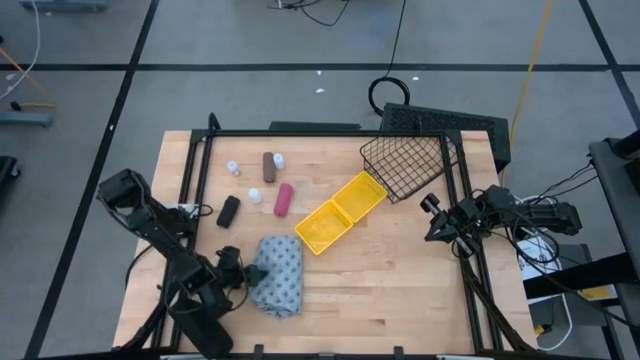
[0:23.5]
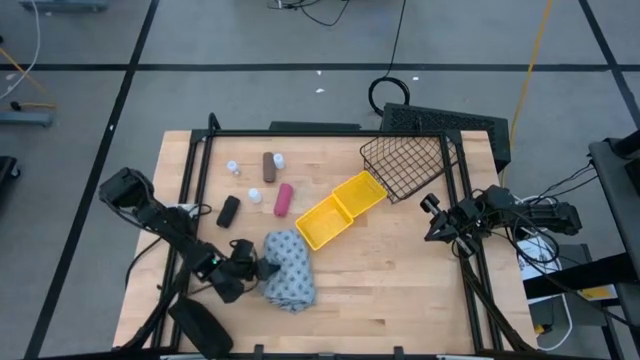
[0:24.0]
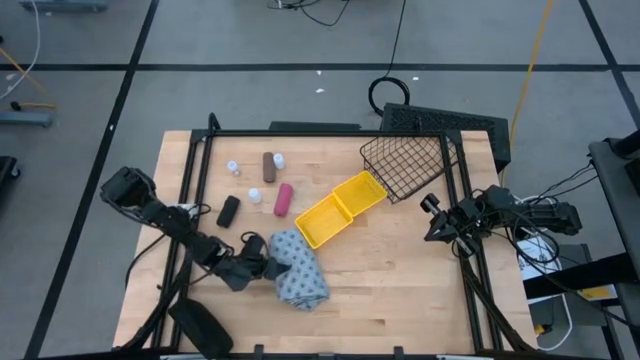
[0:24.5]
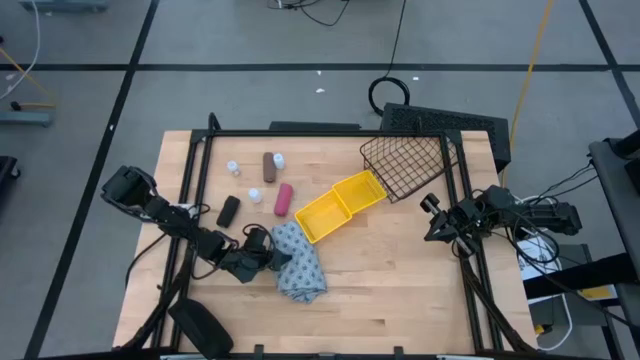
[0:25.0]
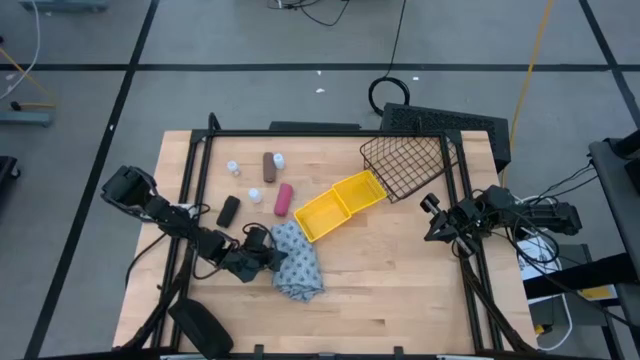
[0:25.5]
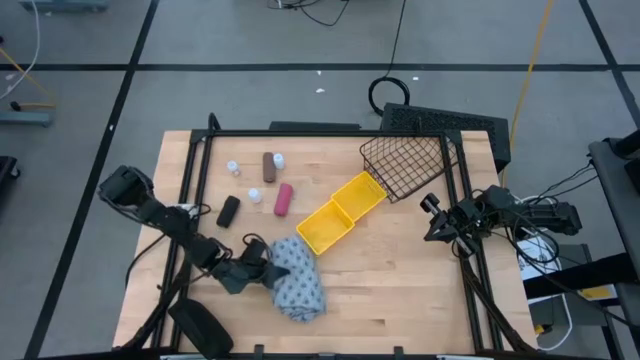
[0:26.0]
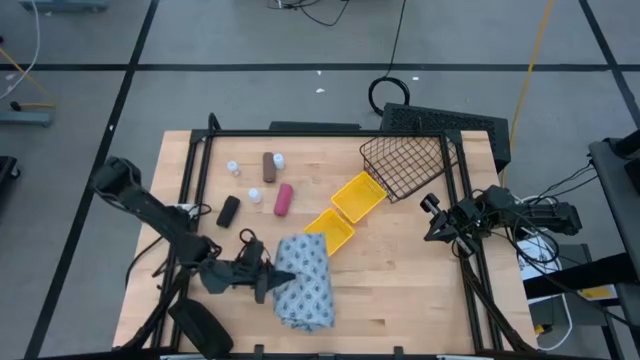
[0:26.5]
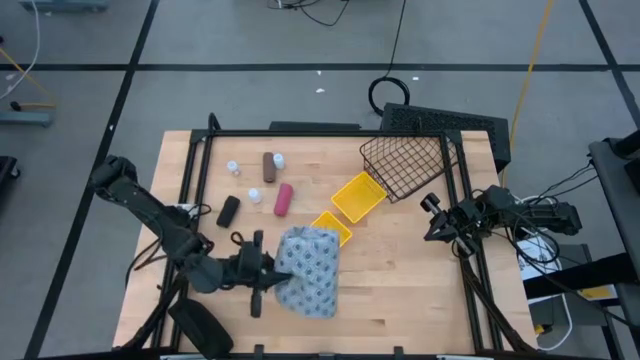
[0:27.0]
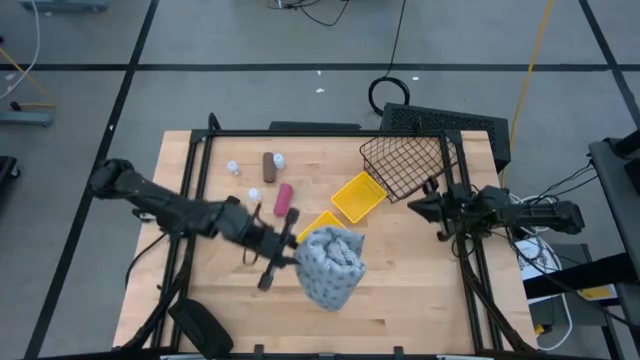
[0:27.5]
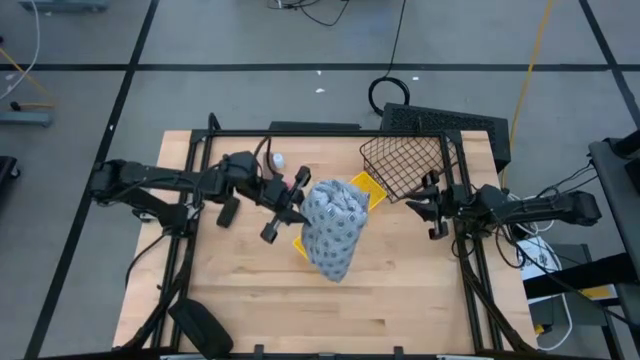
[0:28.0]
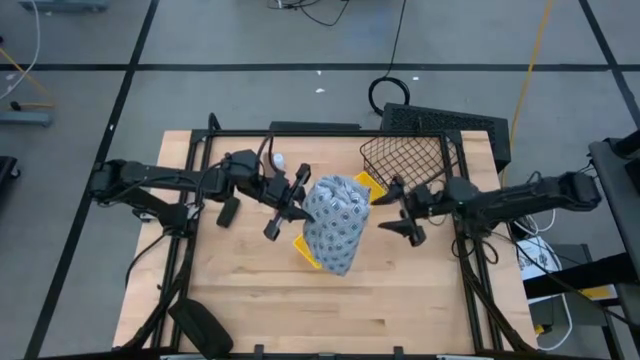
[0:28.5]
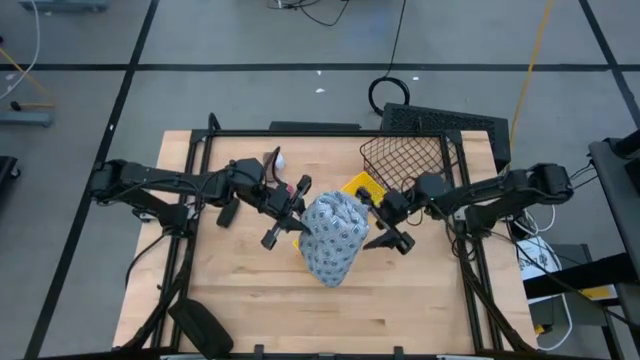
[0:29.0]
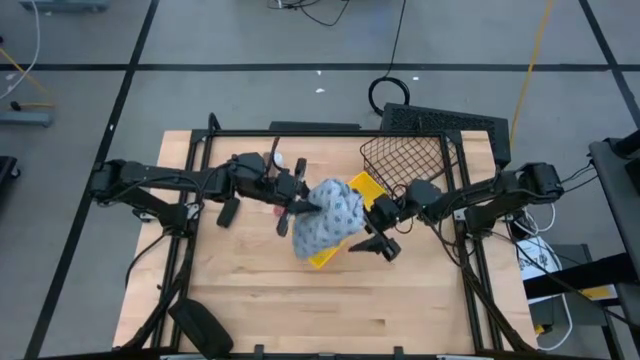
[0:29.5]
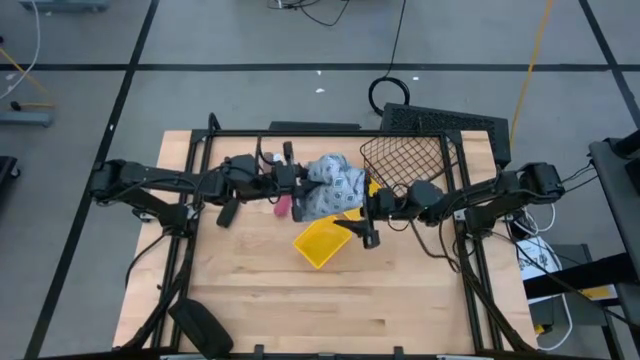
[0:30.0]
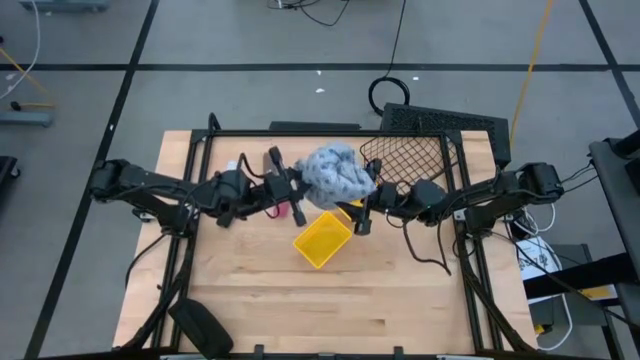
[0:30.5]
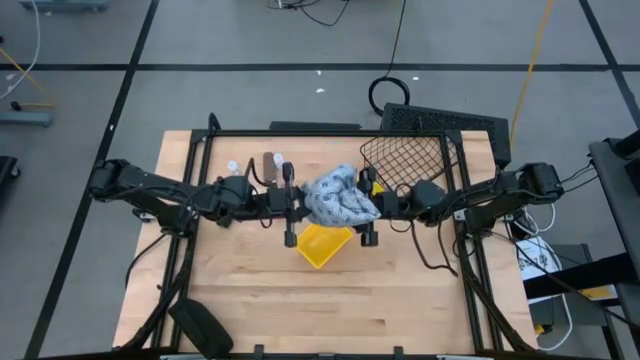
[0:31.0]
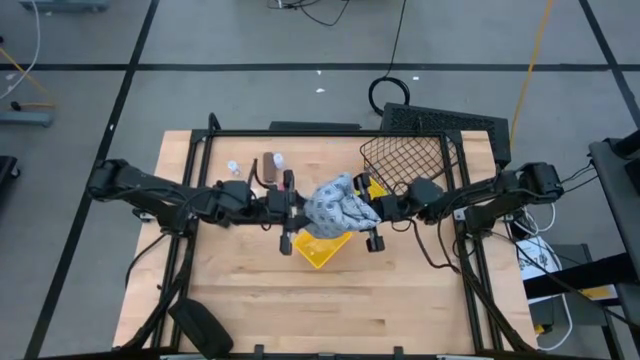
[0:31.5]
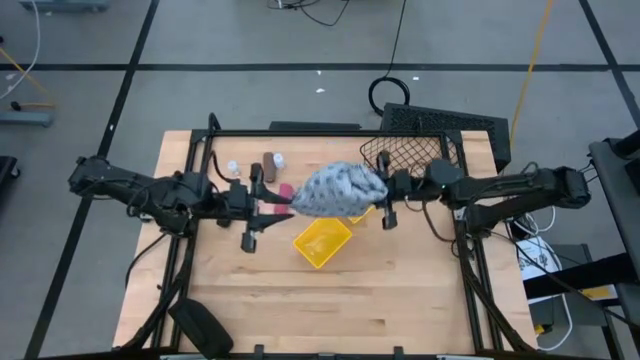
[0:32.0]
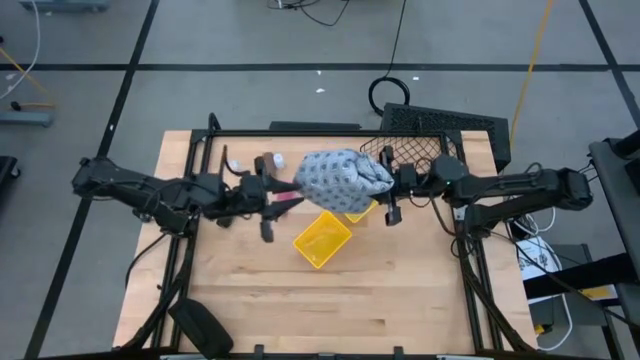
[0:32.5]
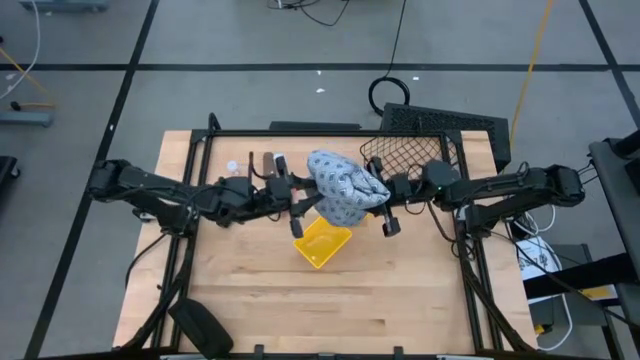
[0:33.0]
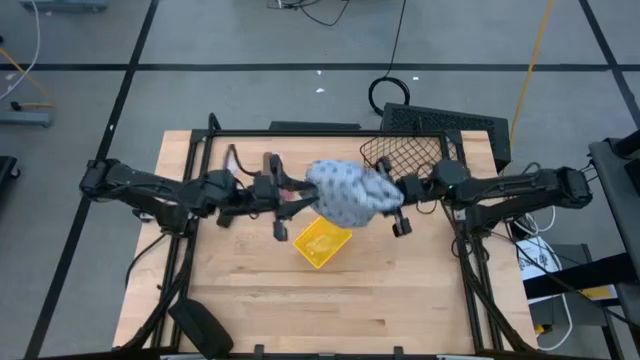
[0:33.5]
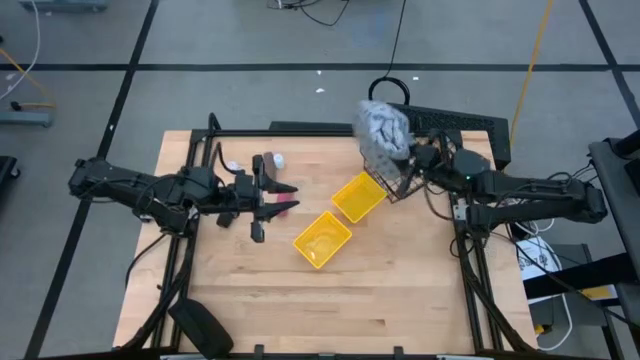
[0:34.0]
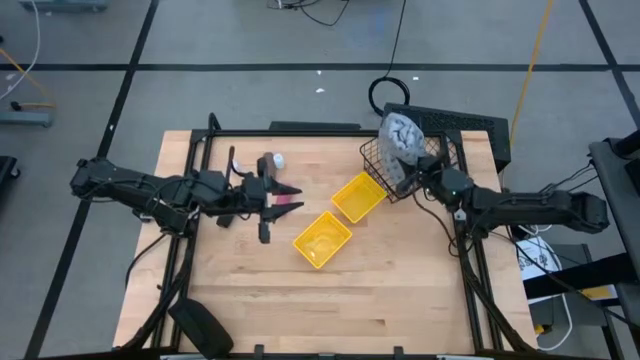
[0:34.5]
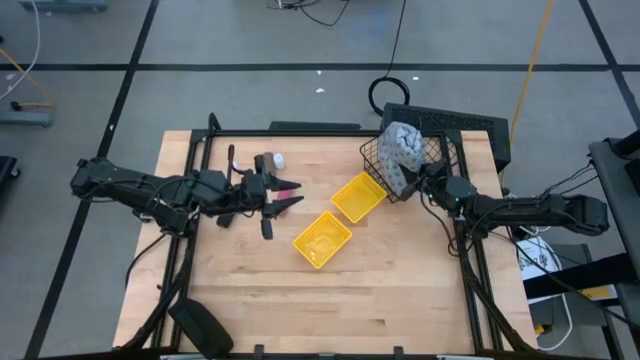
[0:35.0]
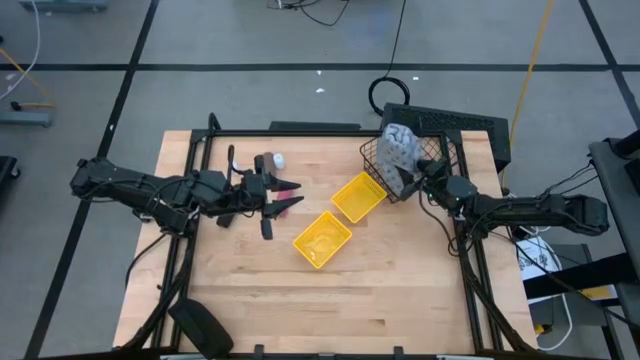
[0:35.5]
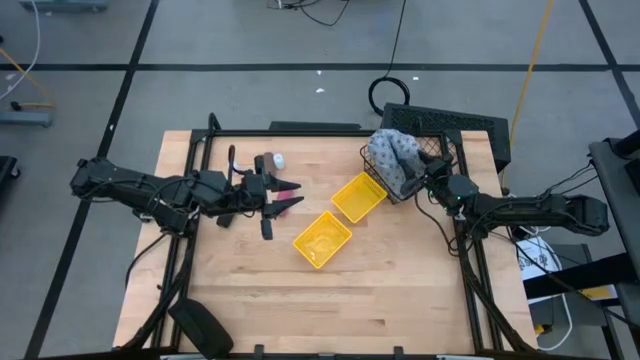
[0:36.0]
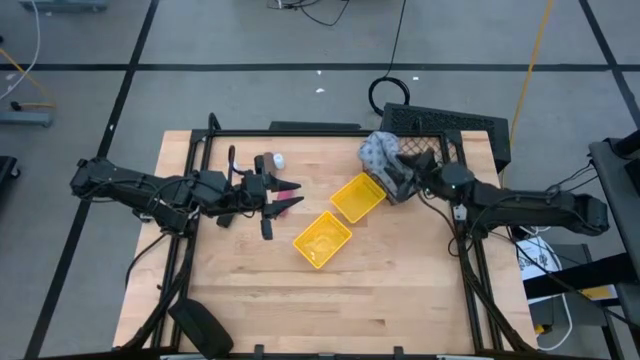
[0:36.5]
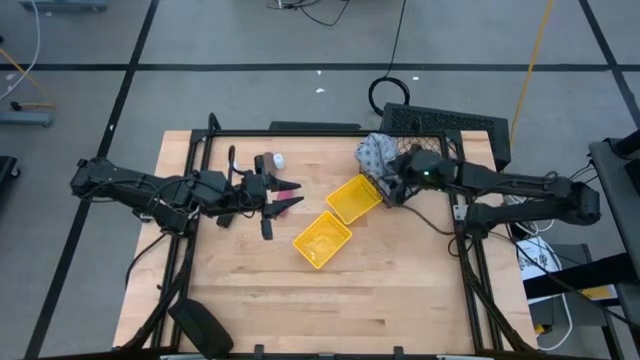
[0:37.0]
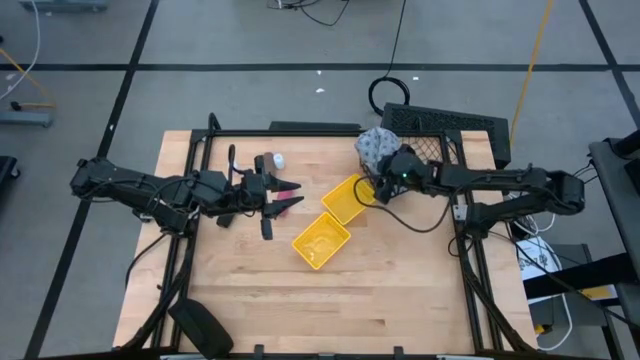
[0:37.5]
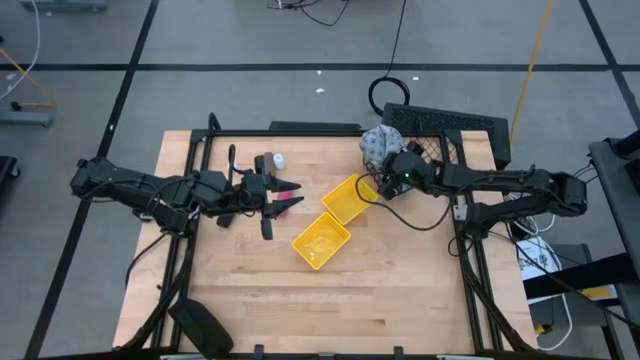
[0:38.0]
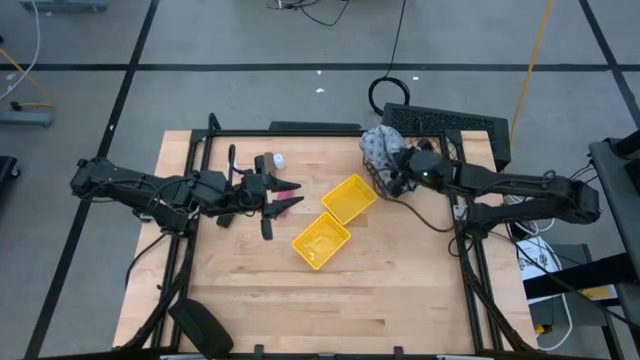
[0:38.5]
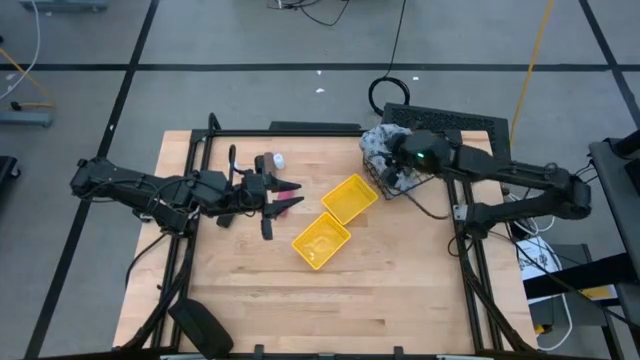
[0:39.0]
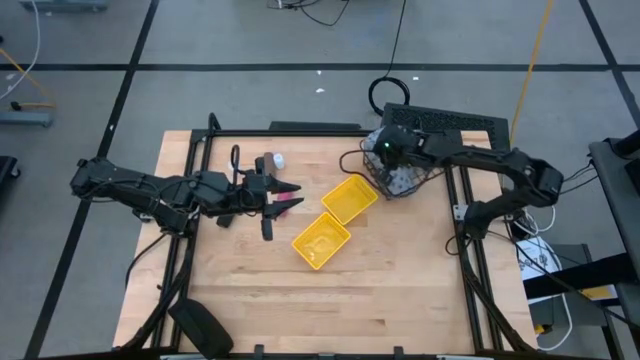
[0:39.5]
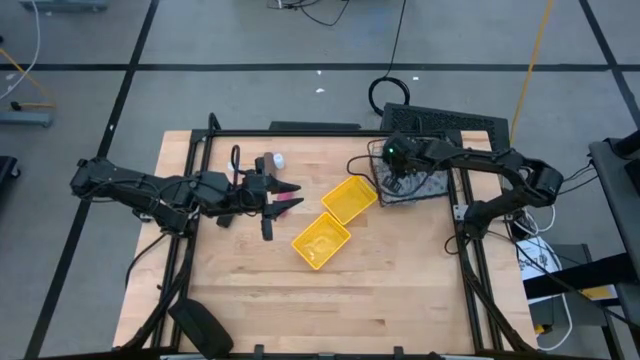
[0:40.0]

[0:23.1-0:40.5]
Task: Pick & place medical supplies in basket/bin
Put the hospital gown into the black wire basket

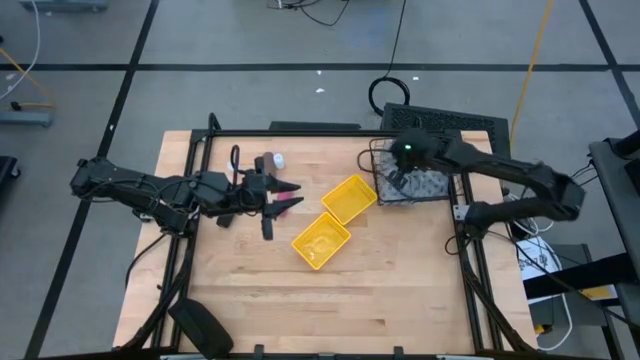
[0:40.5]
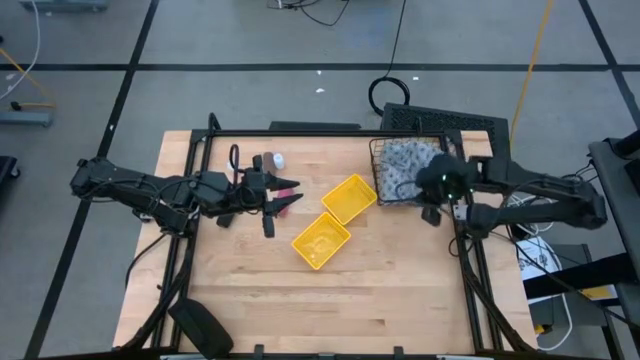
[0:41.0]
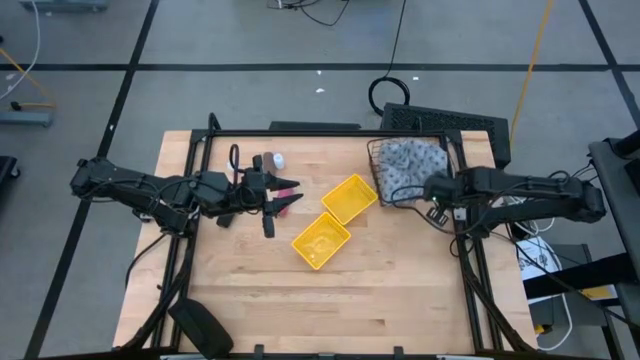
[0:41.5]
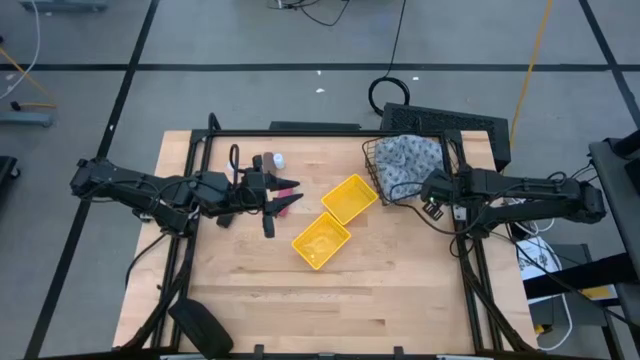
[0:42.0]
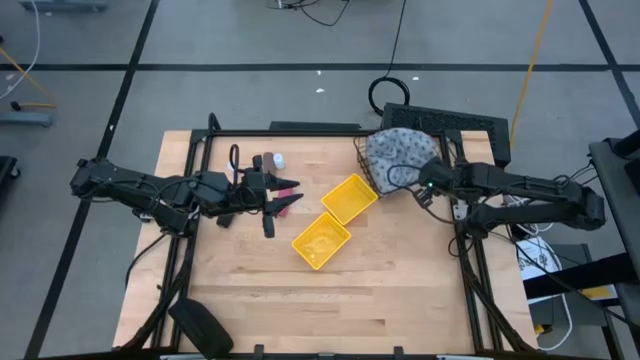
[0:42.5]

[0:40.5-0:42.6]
Adjust the black wire basket

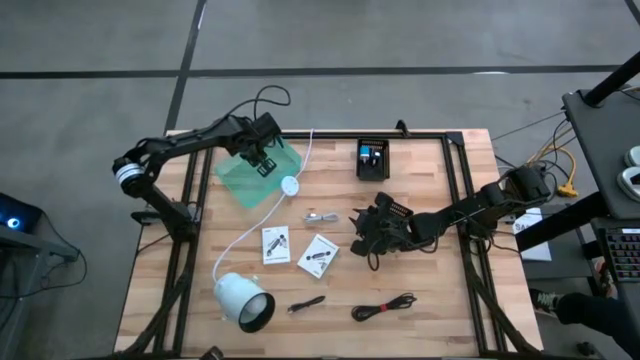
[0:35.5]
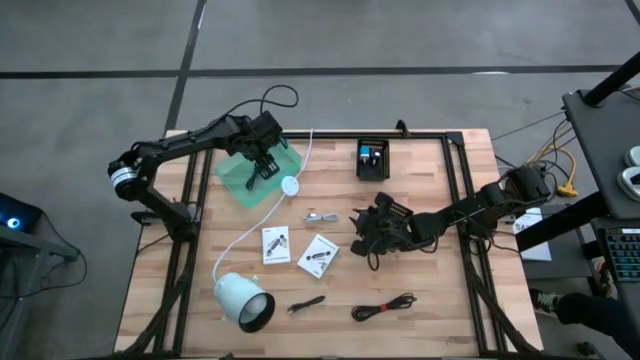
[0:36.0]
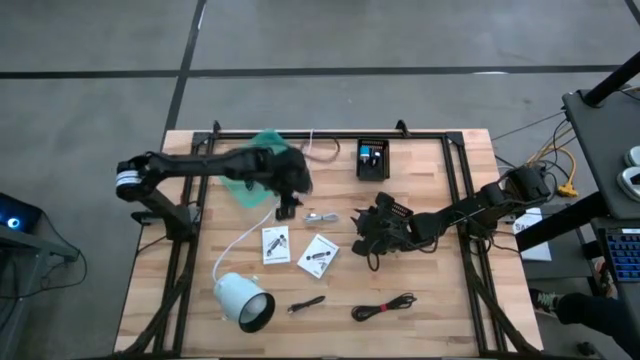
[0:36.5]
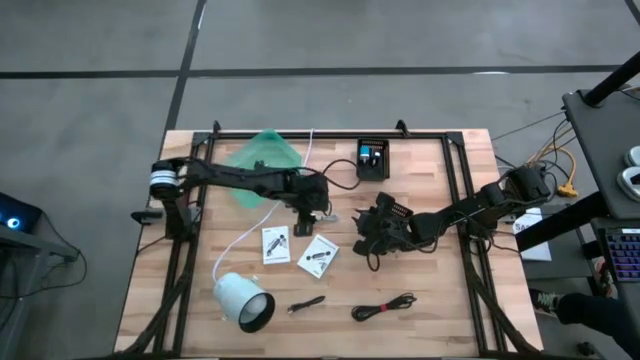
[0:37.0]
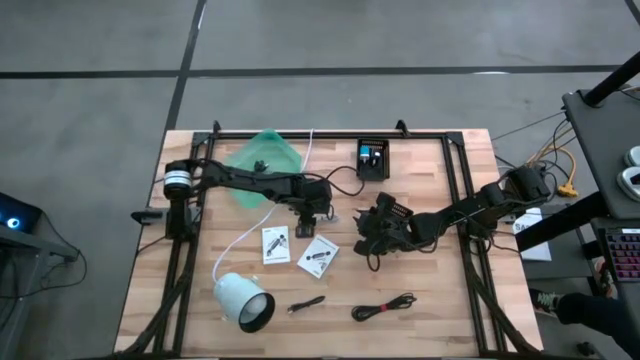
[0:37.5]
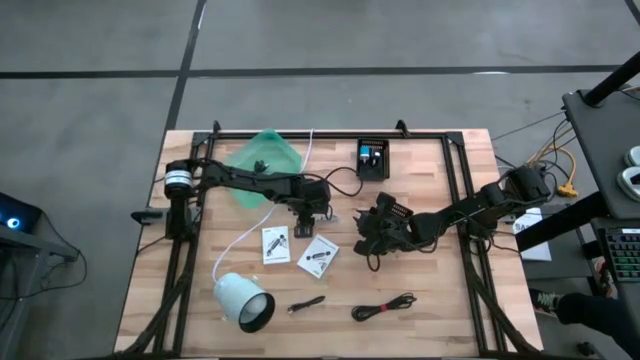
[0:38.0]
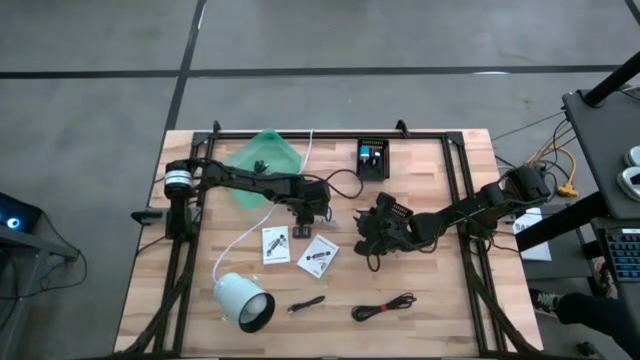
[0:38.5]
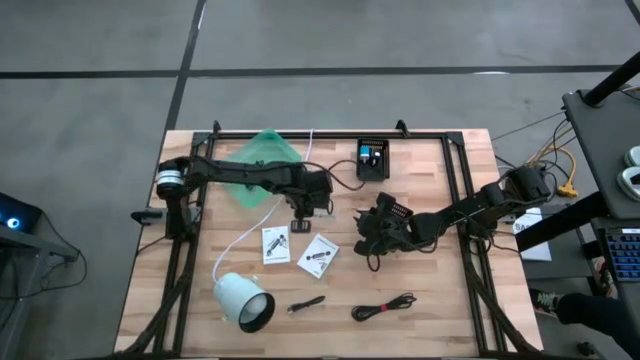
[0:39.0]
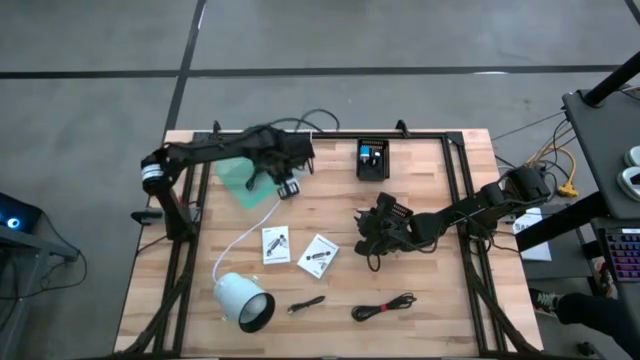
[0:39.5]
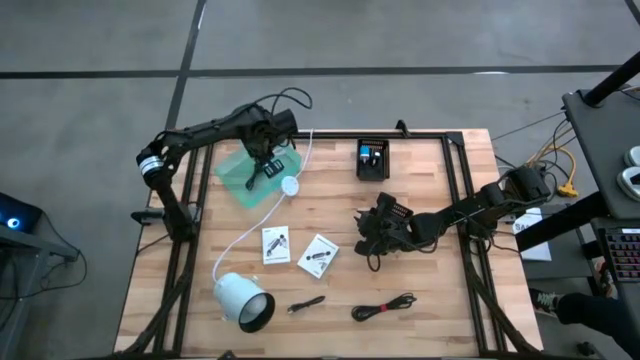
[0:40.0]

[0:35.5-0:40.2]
Task: Pick and place items into bin
Put the white charger cable into the green bin
